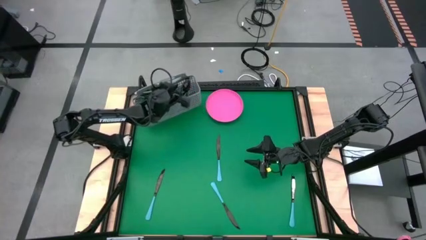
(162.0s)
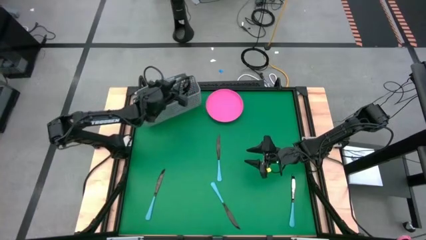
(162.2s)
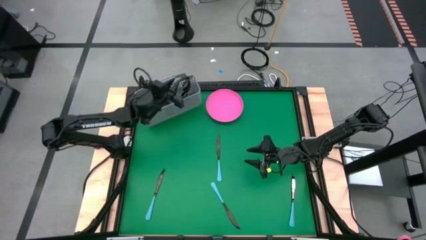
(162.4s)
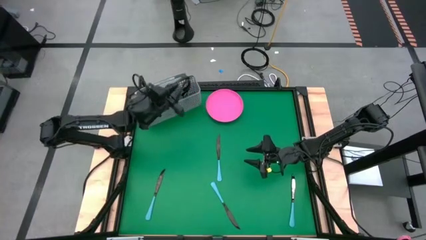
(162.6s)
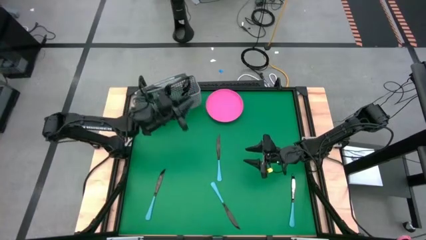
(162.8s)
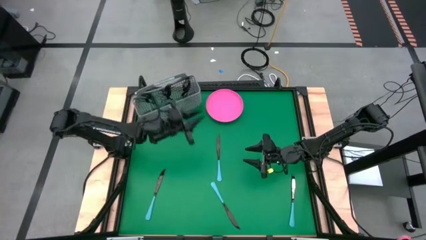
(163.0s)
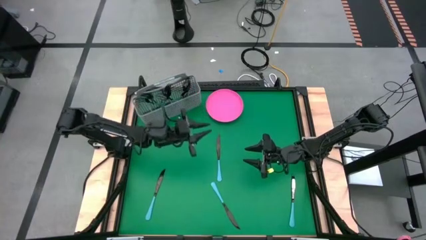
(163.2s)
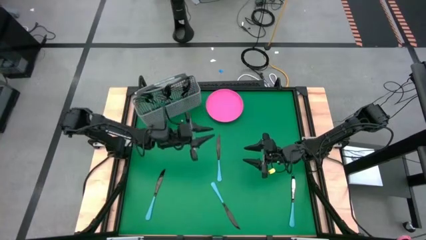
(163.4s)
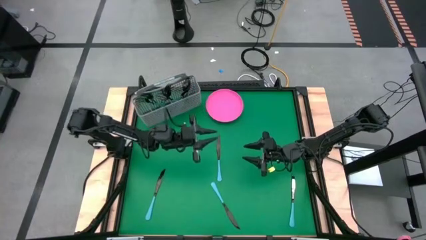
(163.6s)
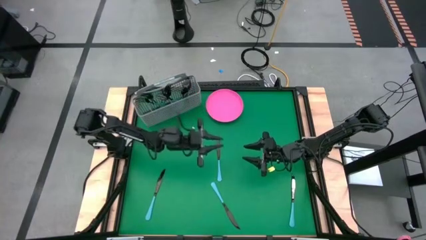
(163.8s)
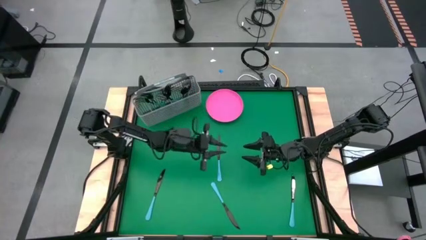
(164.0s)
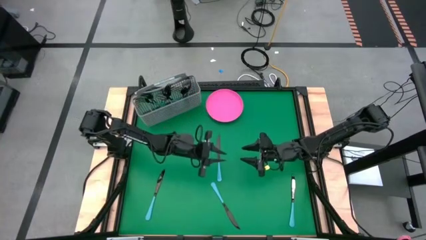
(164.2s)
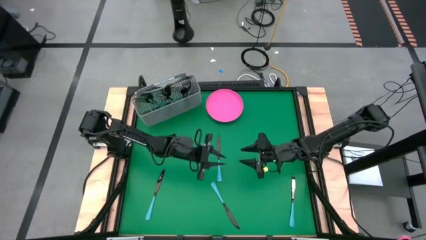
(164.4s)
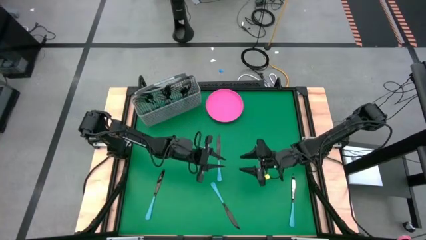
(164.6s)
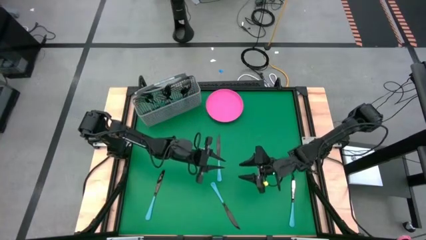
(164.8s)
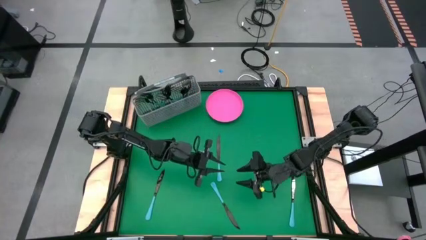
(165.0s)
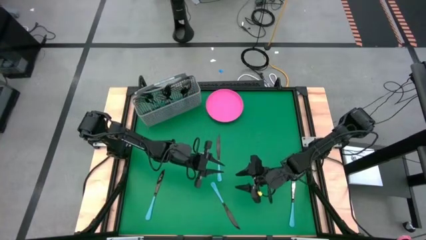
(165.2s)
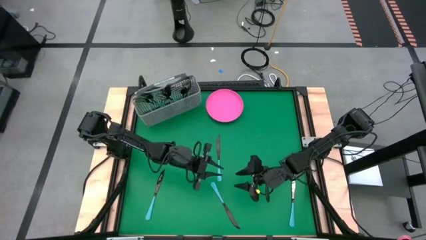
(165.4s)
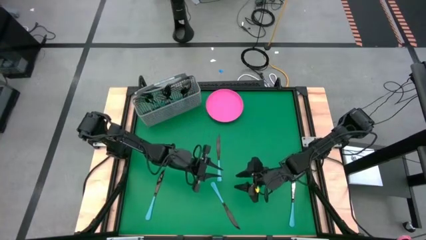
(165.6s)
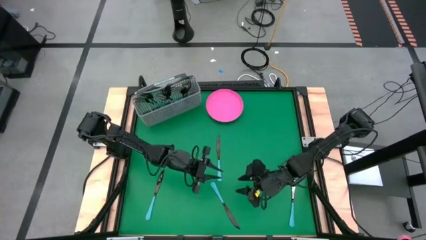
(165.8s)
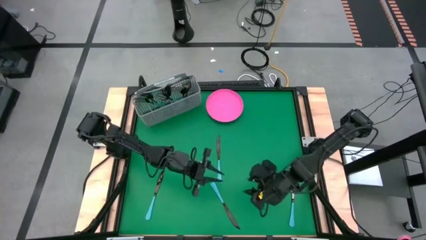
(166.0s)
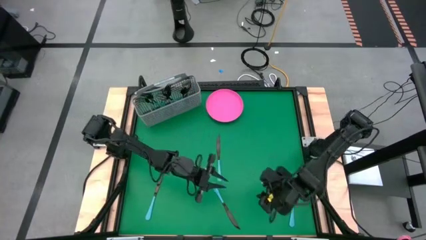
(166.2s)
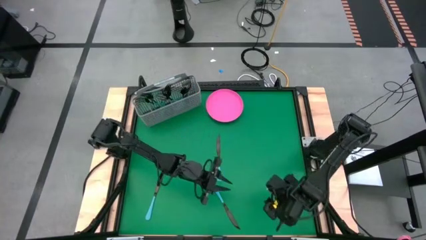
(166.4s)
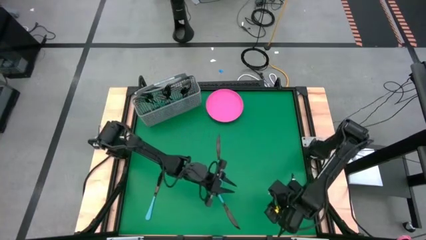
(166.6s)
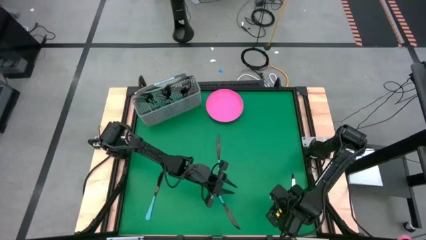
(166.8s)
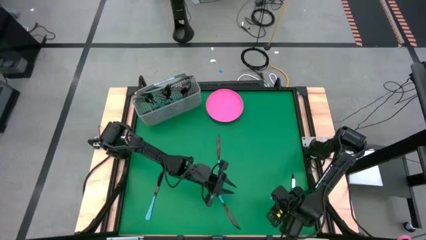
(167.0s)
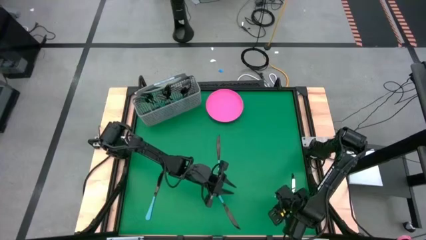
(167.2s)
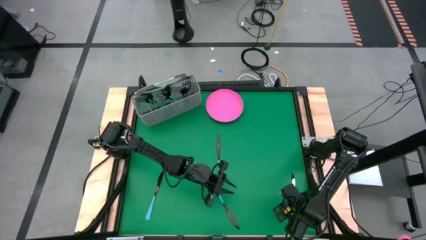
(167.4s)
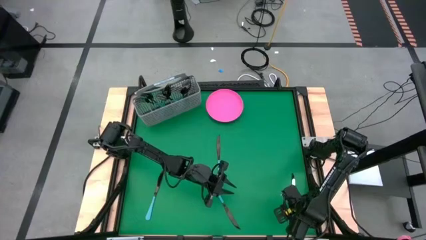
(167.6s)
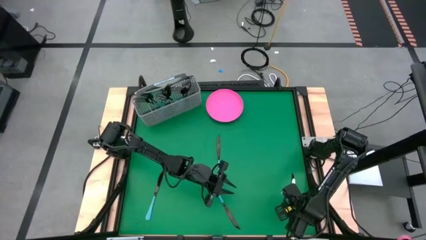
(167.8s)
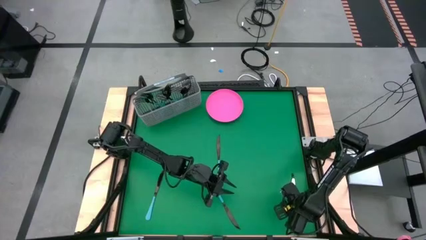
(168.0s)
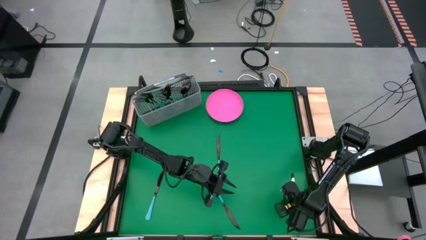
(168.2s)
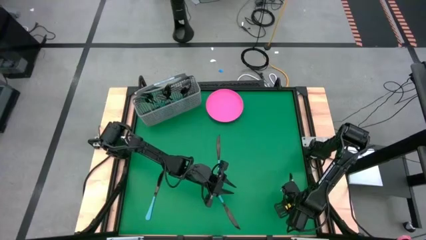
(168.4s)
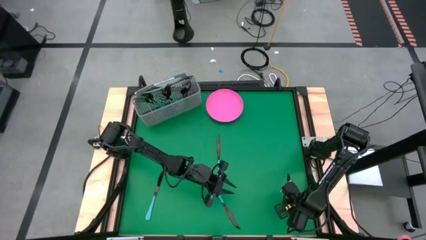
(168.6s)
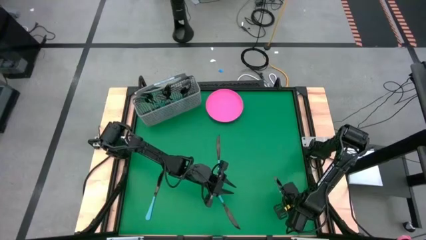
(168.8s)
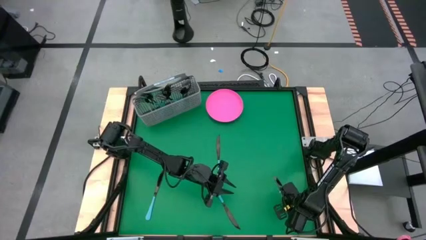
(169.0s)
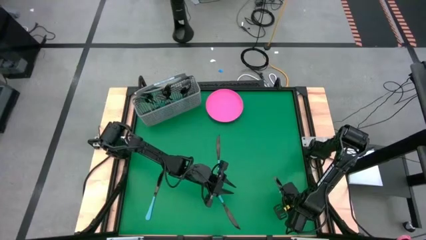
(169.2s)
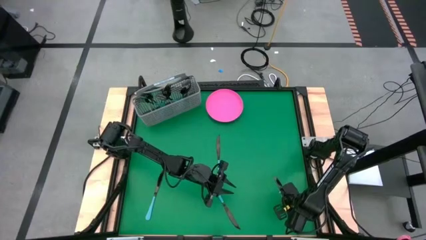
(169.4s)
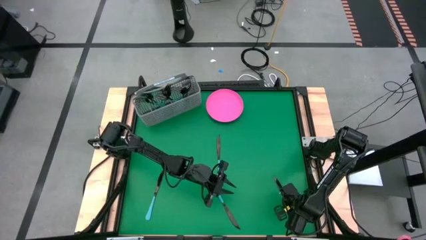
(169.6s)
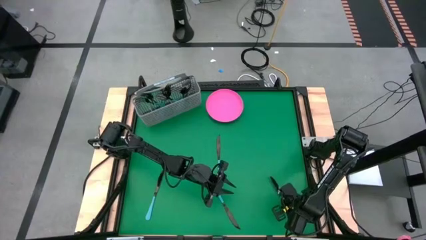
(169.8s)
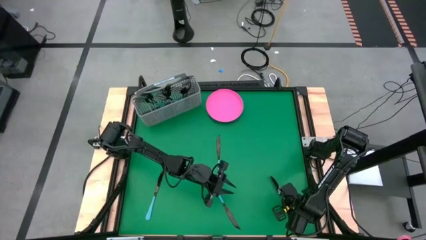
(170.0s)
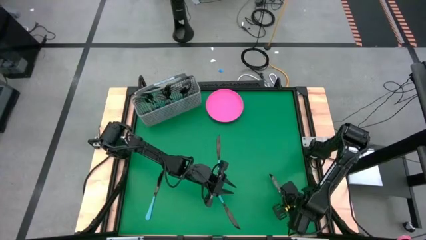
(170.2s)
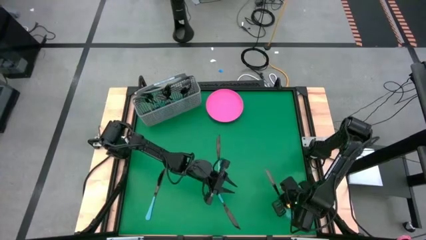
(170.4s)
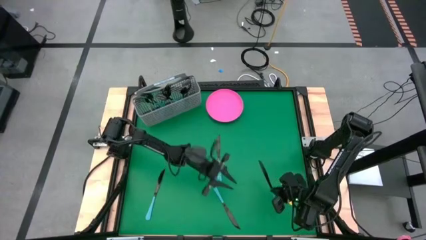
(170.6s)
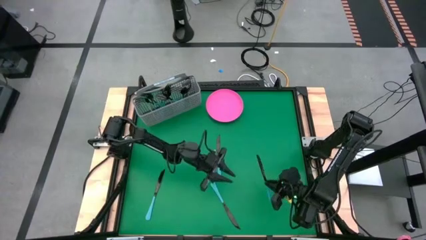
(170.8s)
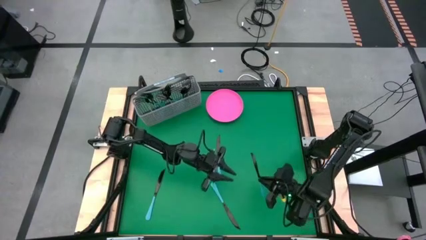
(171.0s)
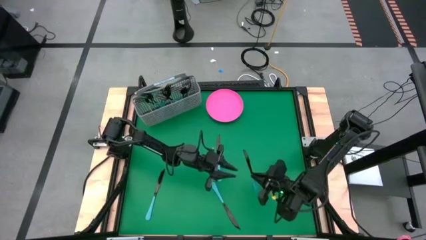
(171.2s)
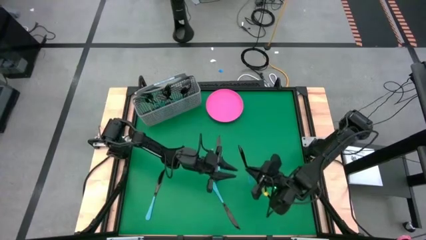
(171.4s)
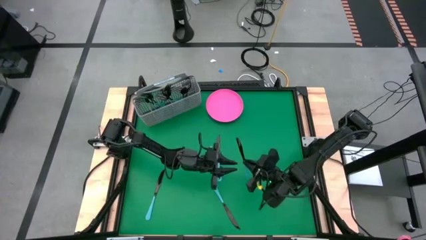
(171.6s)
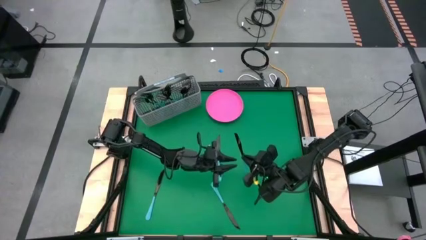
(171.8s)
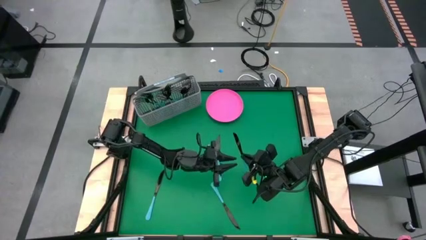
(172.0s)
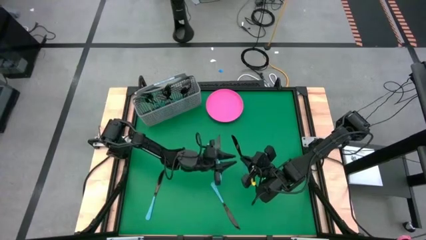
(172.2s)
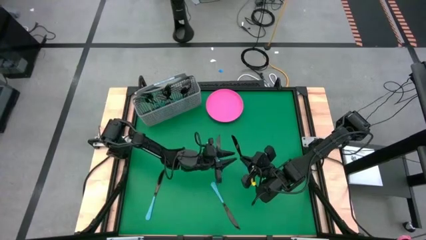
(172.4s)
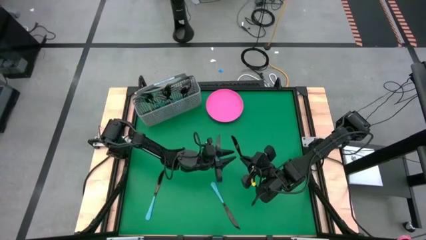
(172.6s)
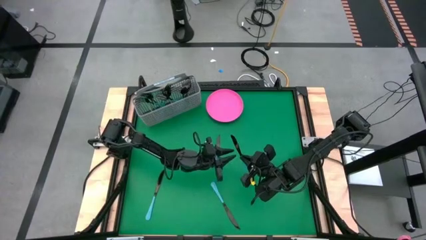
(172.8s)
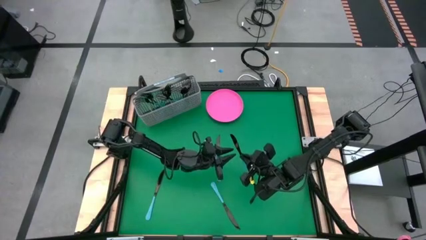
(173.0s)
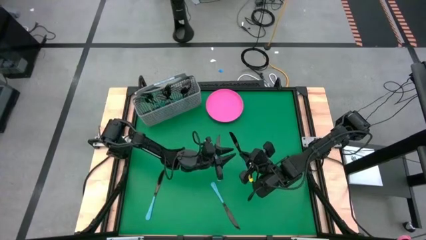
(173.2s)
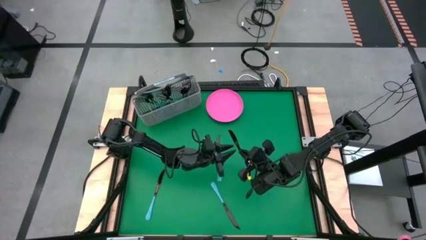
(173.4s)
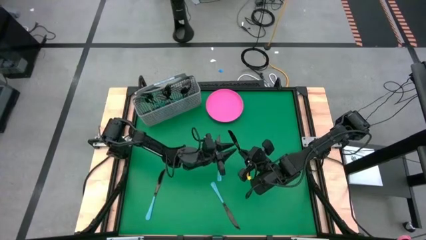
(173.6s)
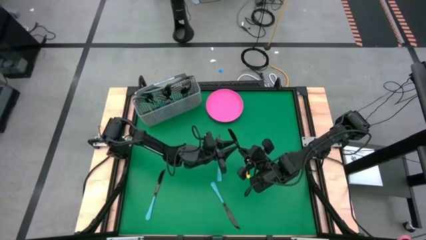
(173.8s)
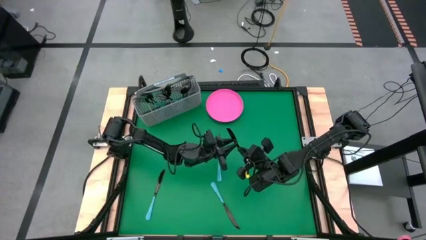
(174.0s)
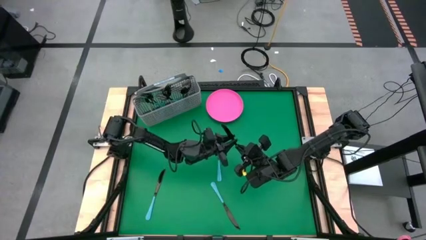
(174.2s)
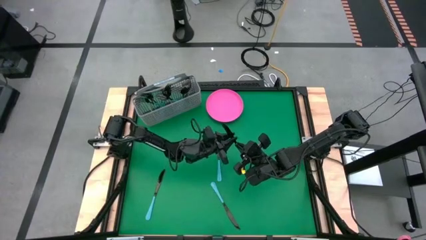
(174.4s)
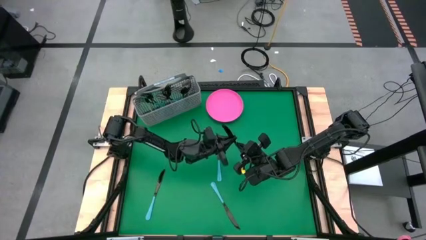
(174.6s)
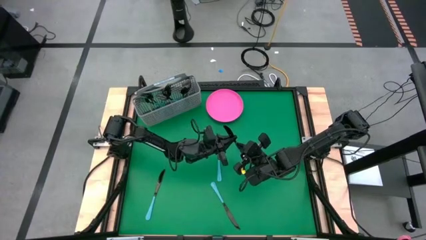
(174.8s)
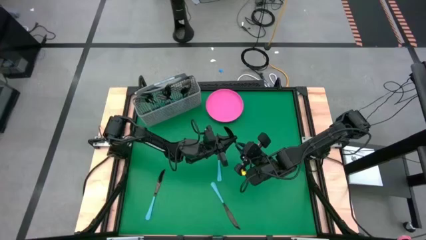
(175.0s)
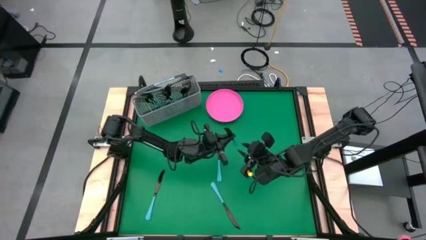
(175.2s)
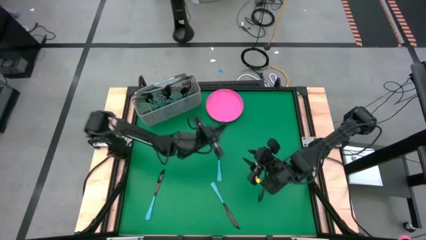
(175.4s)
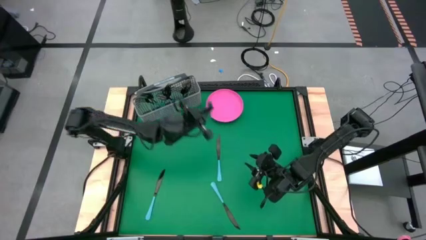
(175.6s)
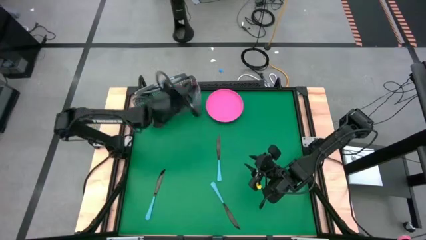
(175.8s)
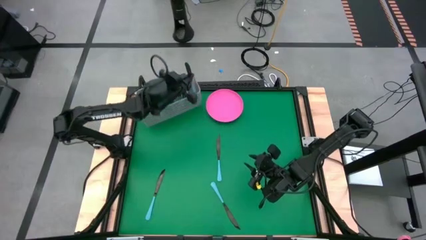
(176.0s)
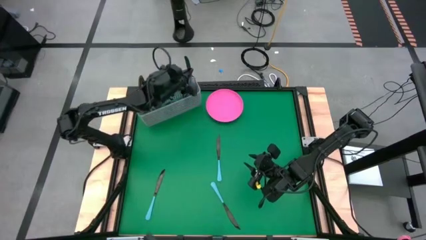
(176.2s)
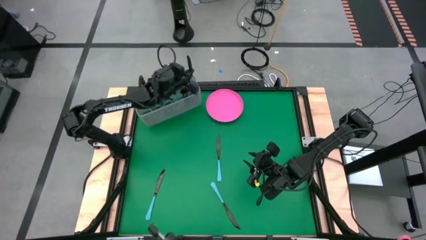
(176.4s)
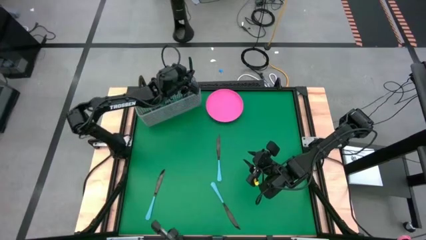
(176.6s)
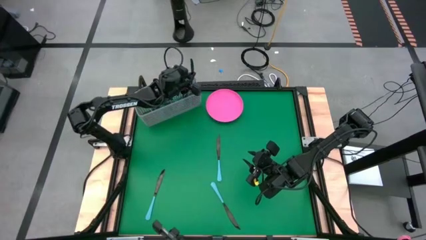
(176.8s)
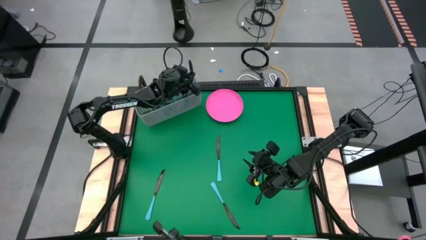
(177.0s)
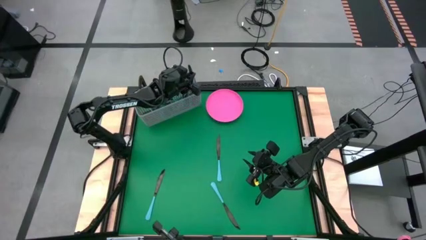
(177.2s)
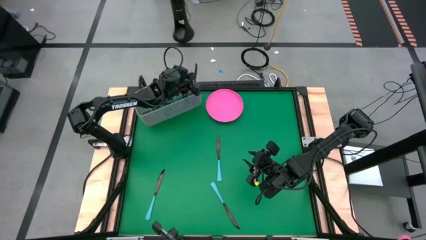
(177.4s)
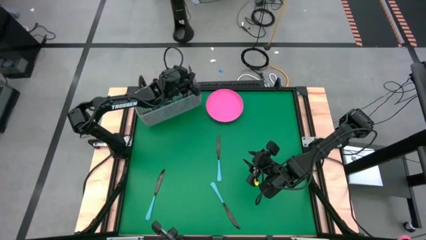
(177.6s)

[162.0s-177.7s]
Task: Sort silverware
Put the blue knife into the gray silverware holder

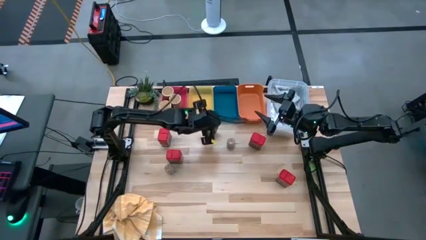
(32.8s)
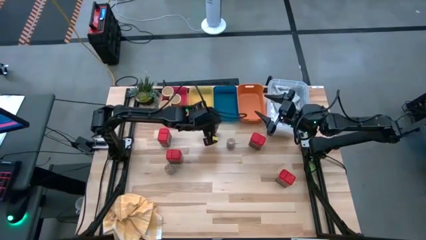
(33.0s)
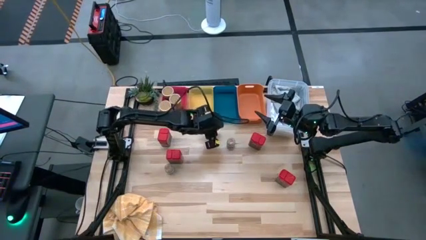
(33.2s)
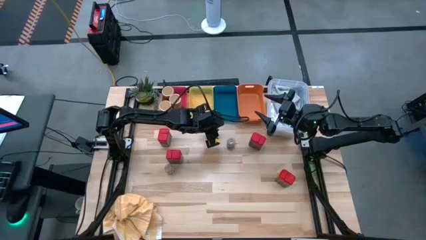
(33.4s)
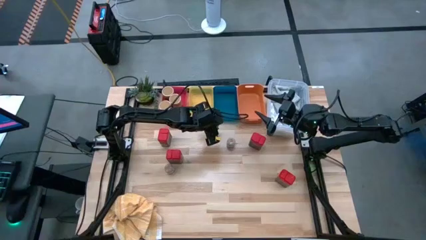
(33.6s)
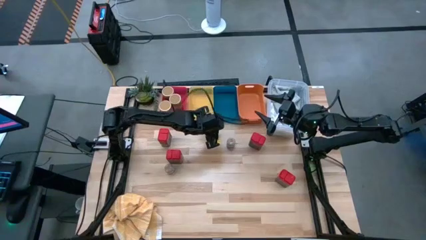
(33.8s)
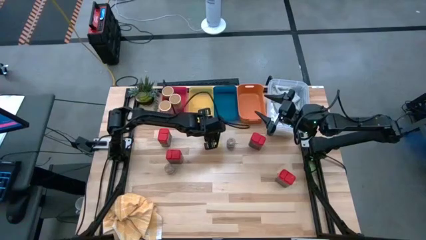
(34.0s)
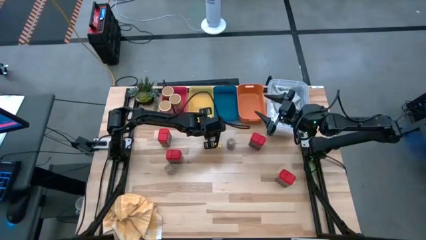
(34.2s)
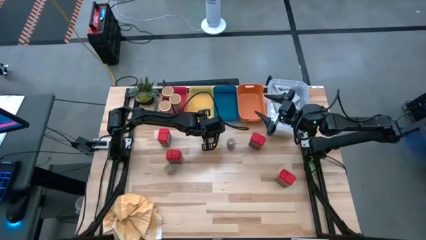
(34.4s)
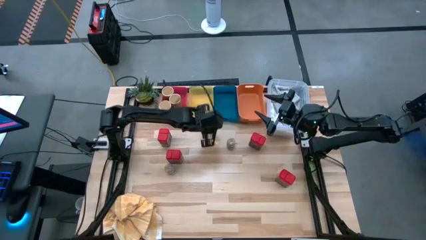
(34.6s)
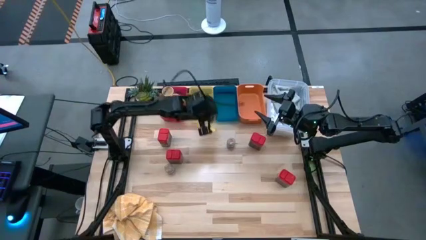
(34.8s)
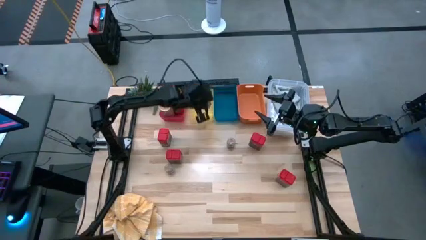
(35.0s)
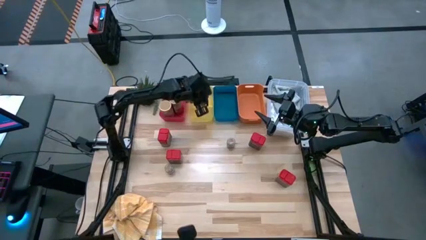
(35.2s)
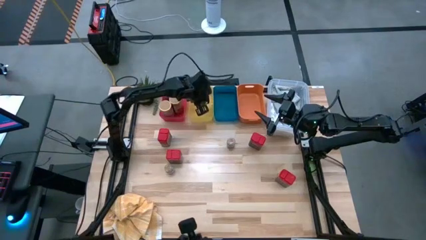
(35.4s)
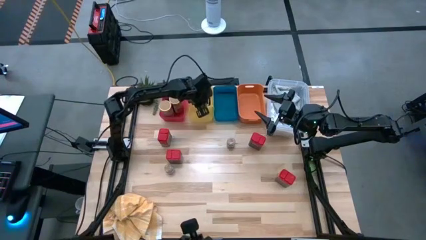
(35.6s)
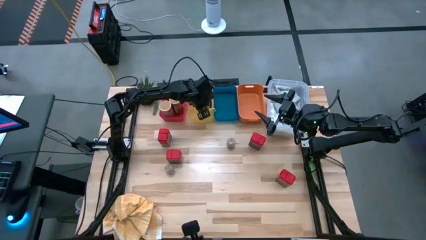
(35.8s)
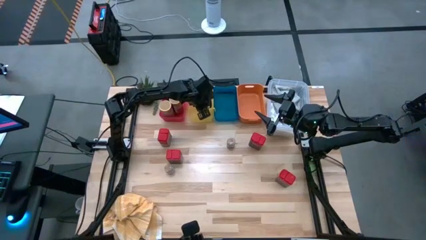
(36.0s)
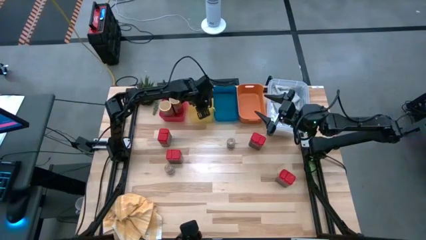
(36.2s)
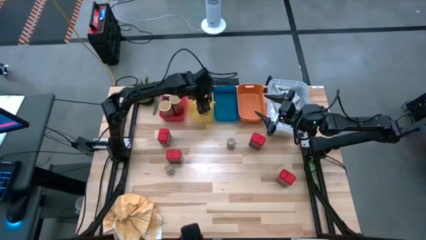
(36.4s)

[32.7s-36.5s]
Task: Sort spices by type
Put the orange spice pack into the yellow bin
